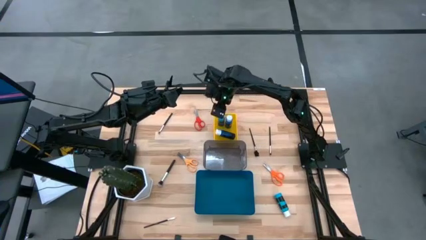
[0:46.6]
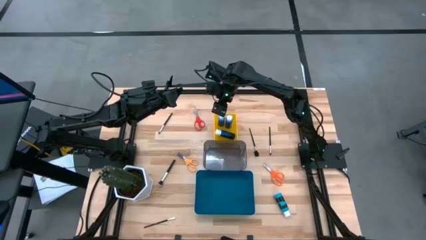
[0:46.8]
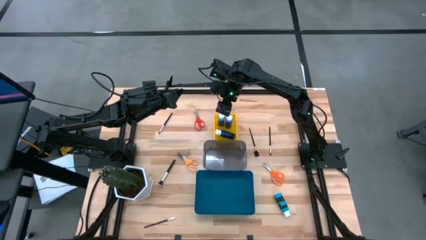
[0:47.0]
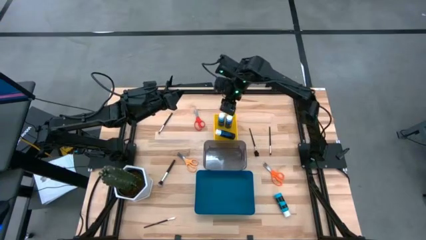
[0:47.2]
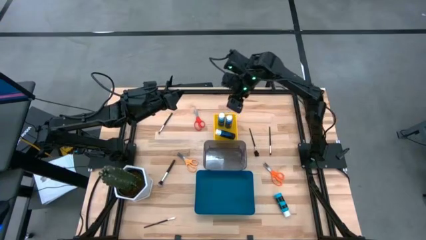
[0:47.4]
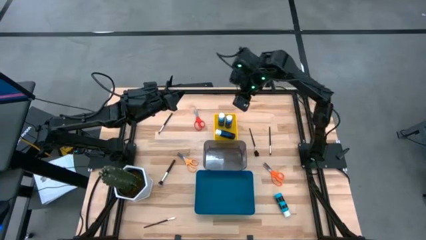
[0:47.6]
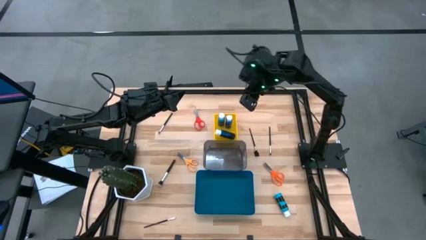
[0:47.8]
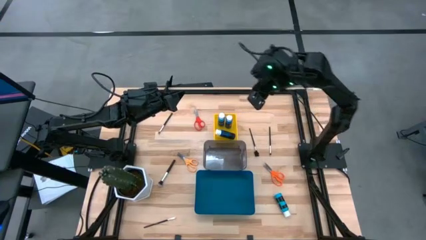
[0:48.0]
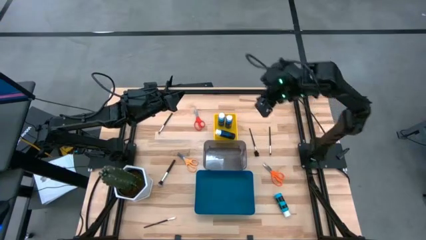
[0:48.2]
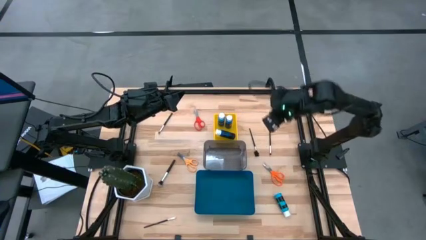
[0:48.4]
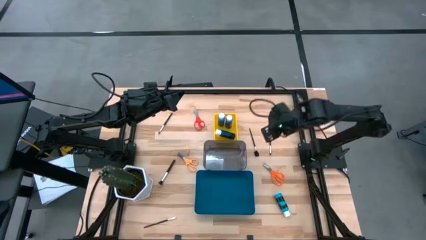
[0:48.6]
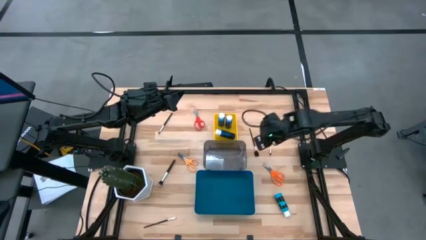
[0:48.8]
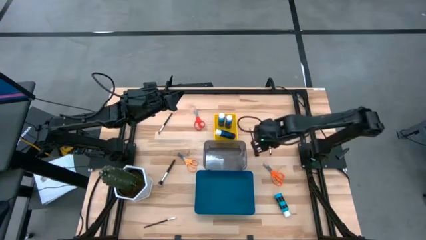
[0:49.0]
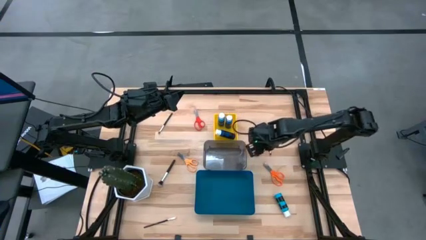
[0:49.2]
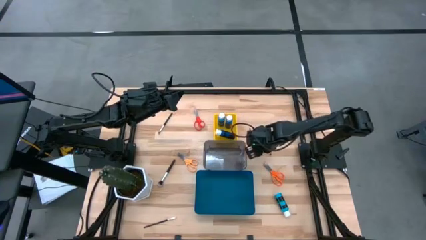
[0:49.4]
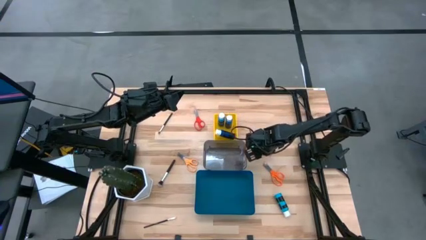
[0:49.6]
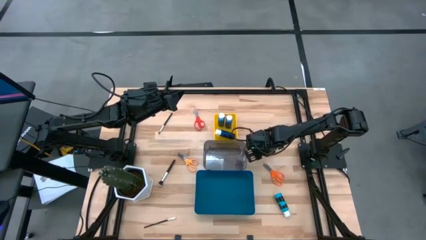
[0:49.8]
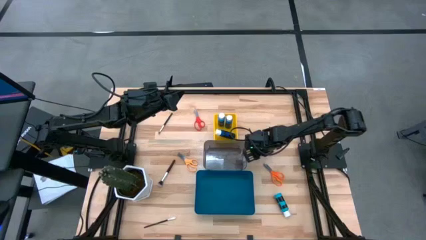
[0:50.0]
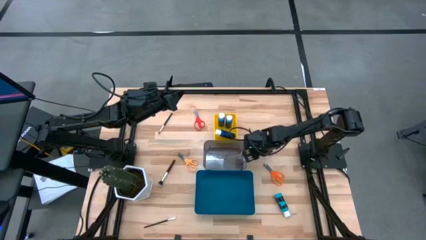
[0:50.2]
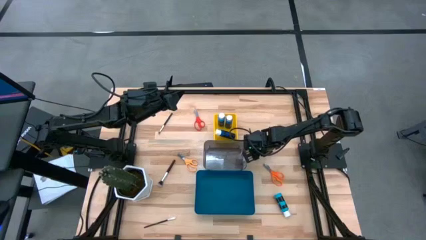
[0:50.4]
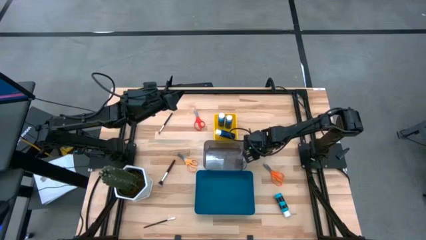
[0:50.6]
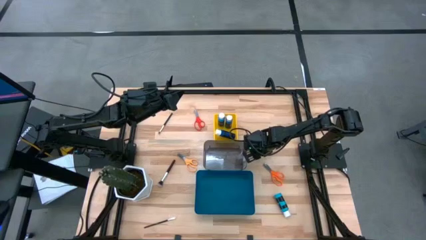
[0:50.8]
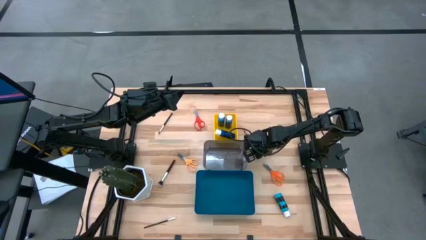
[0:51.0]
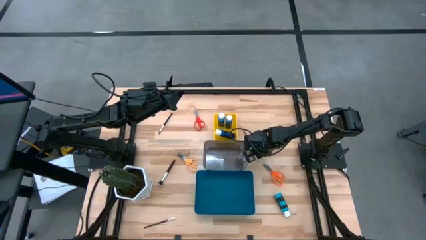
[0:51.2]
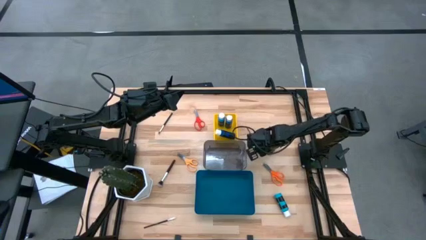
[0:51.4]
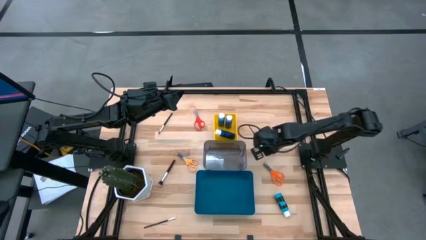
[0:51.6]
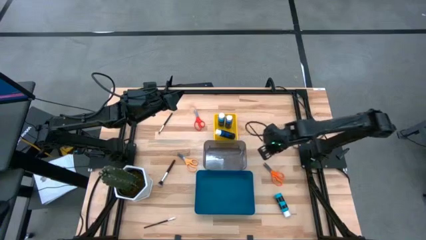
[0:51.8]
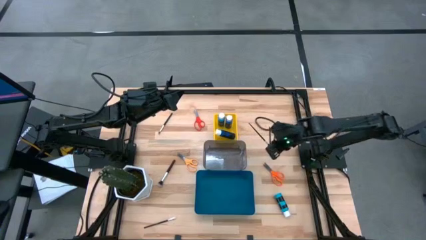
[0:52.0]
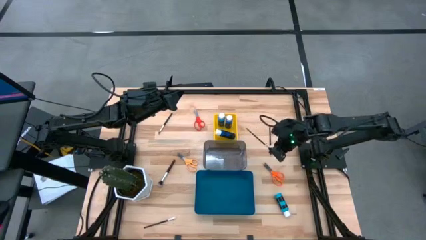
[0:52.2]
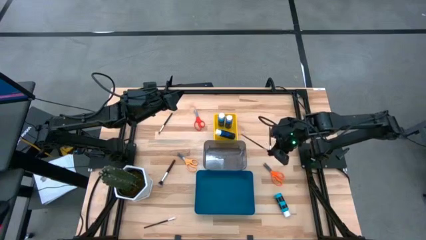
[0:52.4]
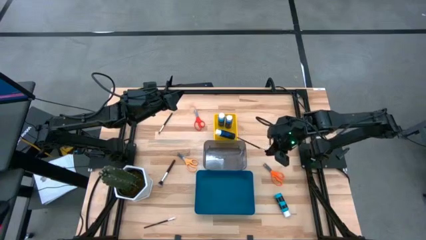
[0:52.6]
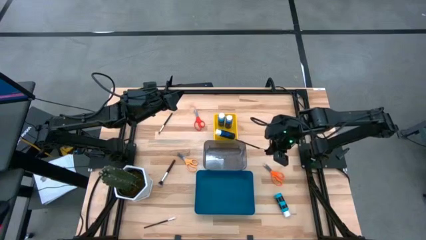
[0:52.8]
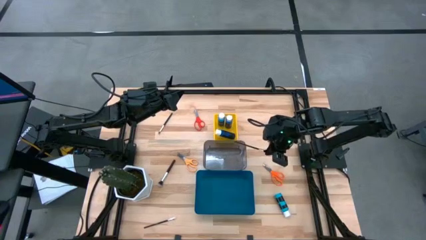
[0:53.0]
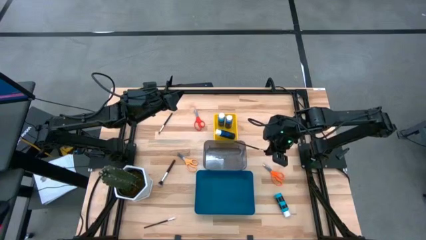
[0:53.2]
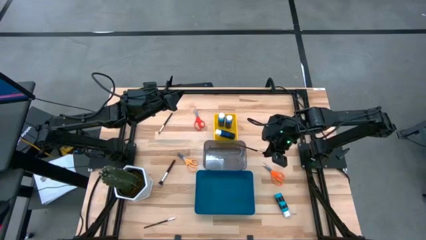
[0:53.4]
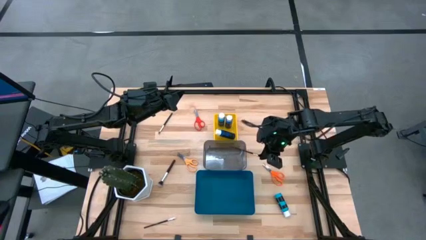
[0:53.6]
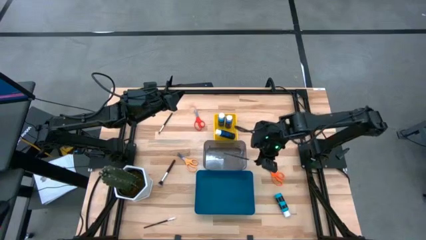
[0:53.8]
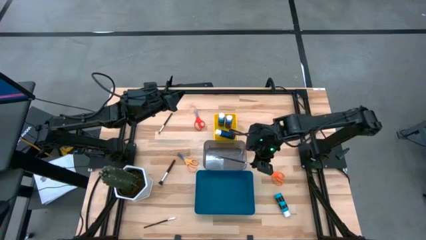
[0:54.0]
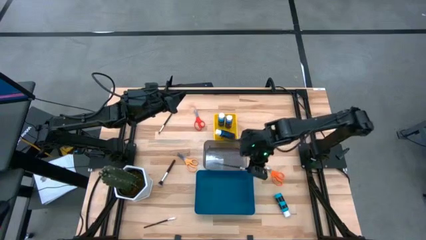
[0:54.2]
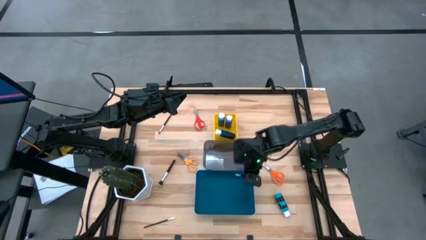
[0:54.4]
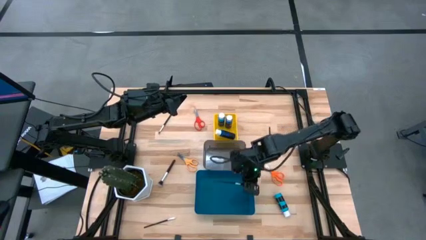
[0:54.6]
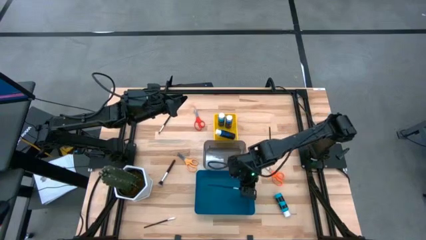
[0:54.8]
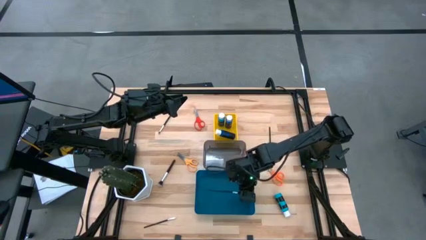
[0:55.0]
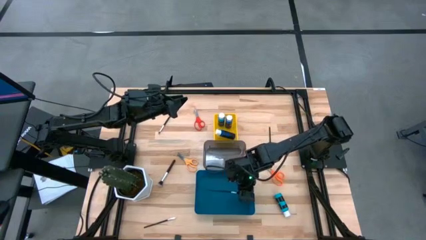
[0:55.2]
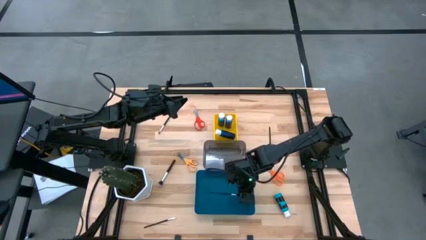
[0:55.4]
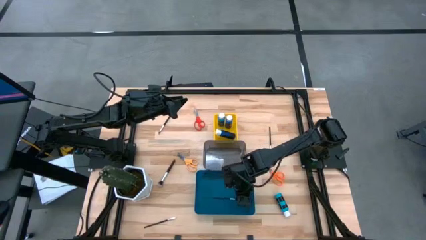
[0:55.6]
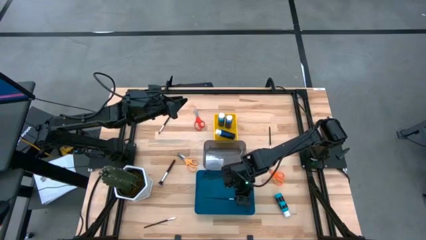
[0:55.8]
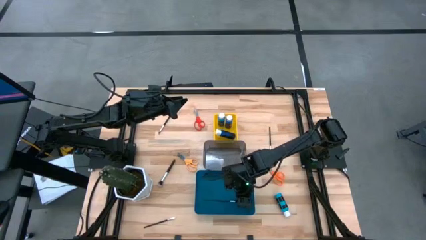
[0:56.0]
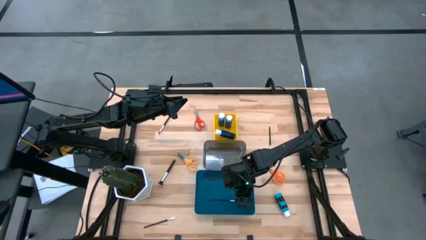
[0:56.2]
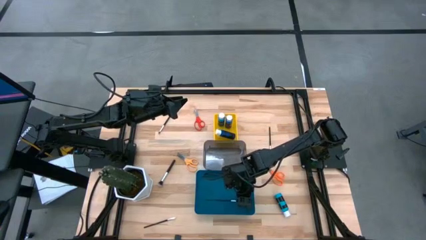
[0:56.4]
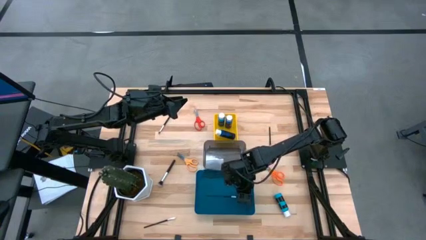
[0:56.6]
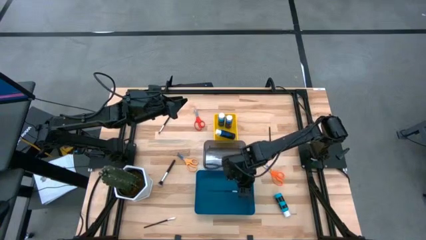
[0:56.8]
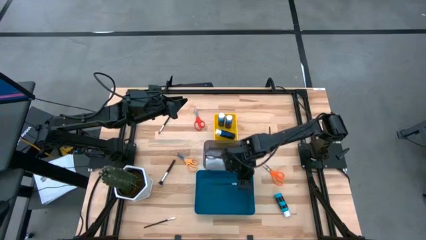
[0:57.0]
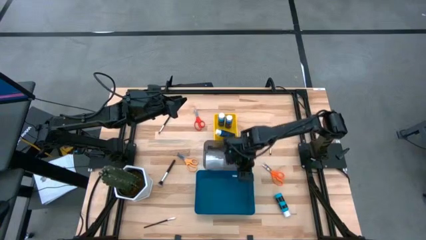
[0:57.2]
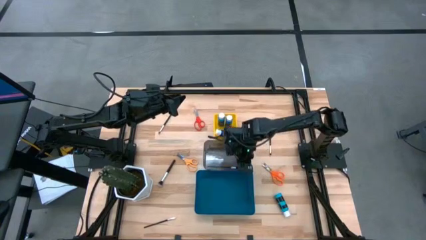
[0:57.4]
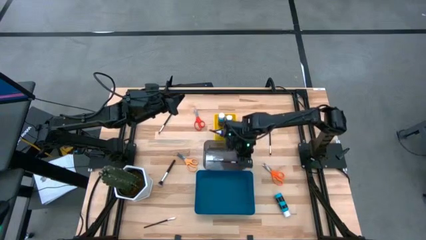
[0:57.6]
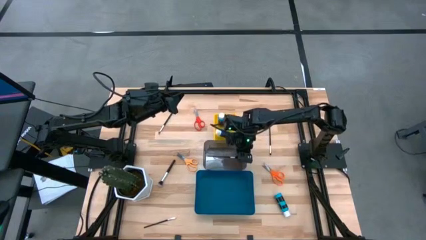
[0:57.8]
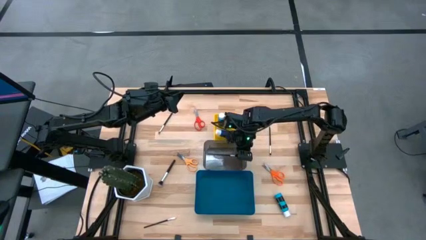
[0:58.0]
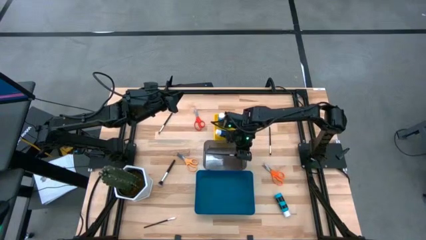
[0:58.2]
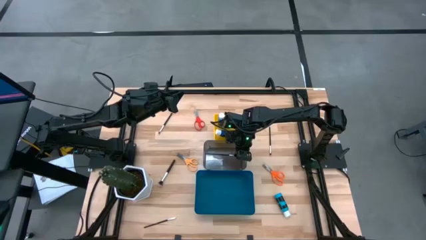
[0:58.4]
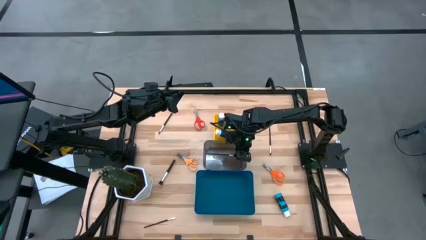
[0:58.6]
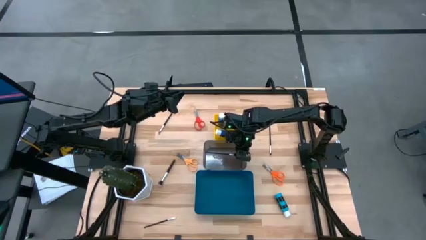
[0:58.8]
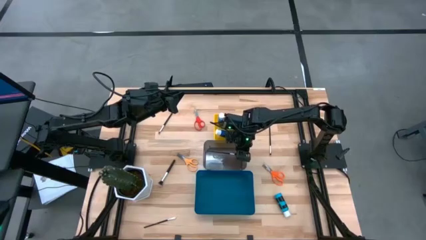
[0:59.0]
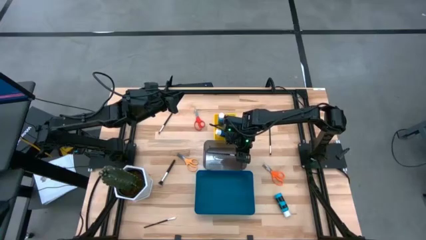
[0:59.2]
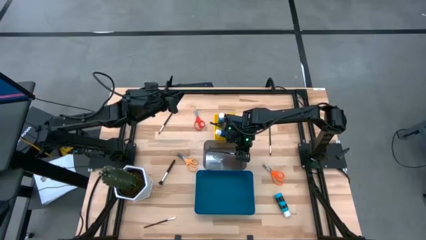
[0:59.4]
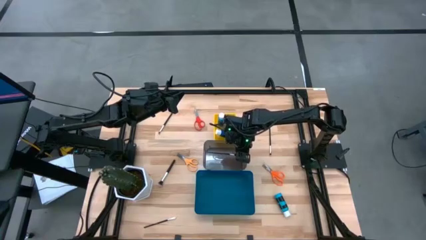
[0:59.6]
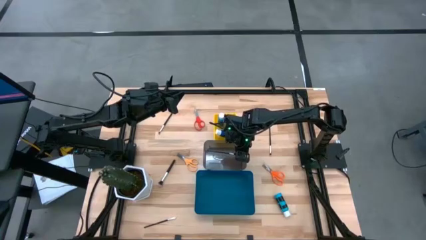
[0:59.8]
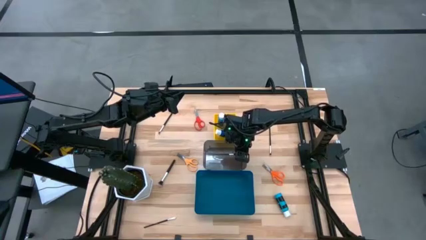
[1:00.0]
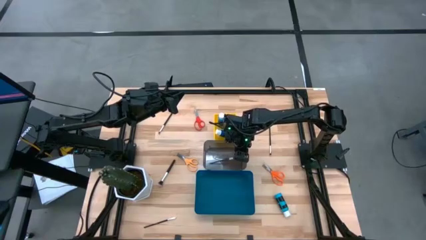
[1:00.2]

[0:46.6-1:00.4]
Task: Pick & Place Paint Supplies
Put the makeup brush into the black bin
